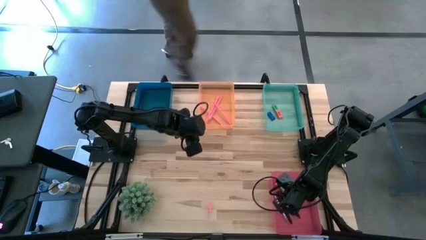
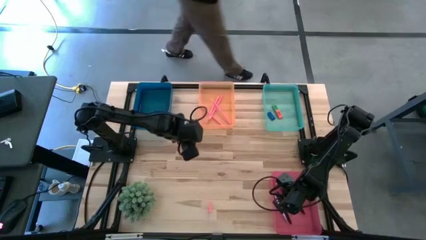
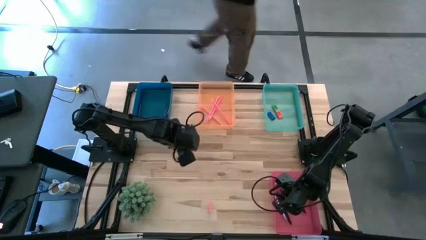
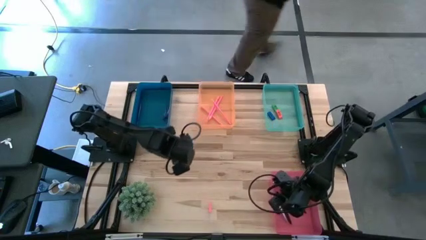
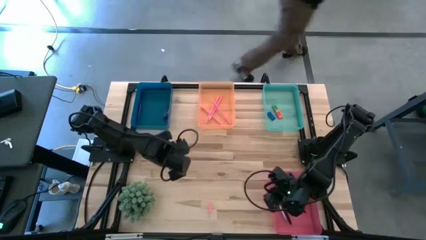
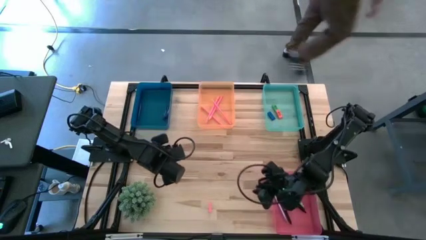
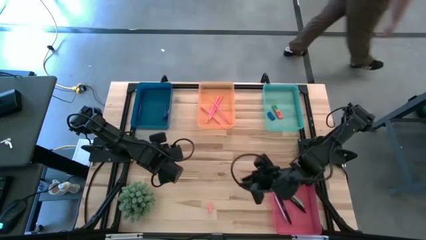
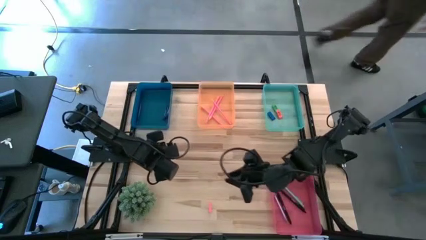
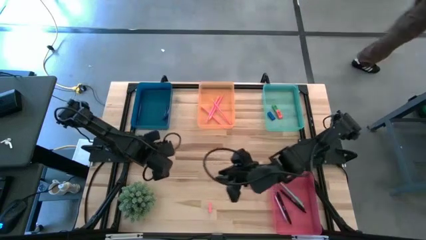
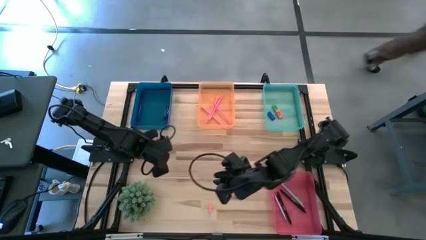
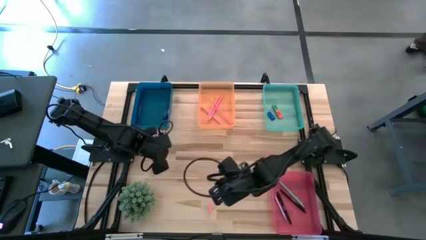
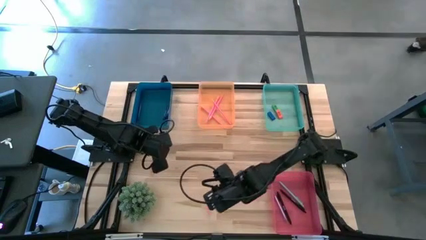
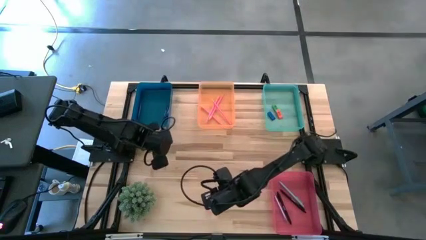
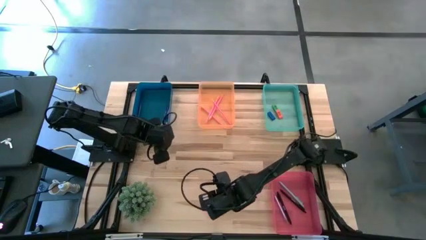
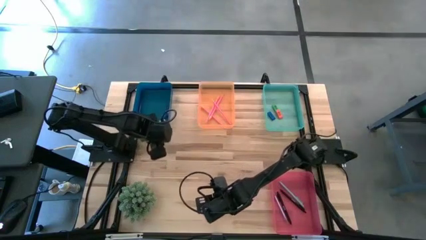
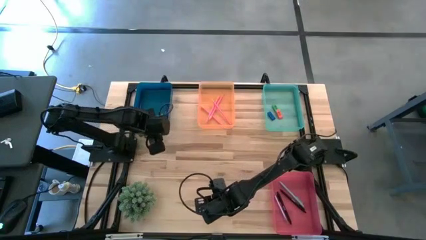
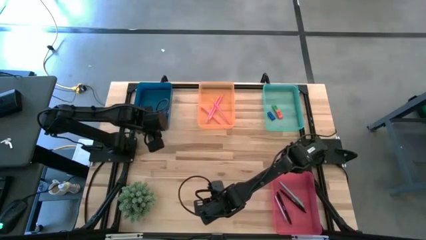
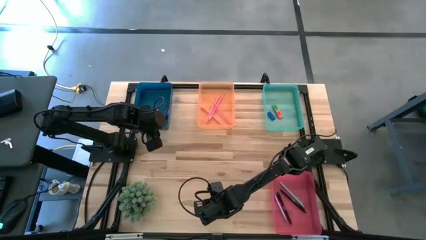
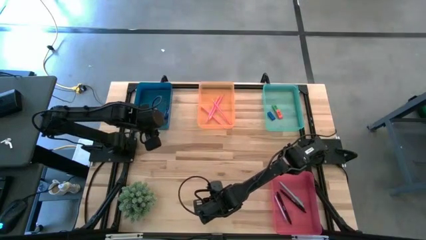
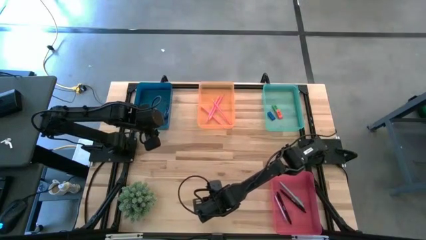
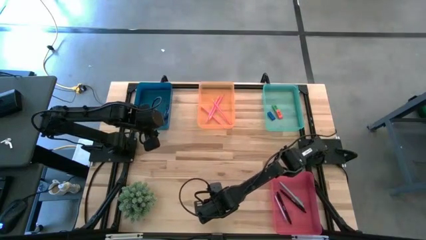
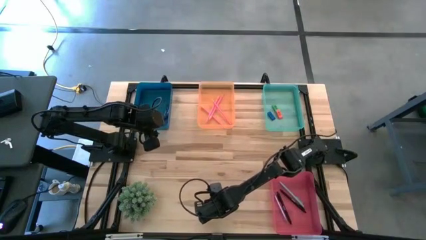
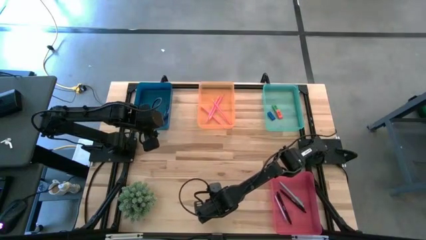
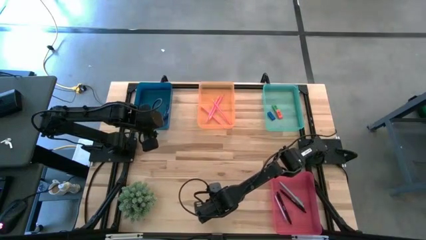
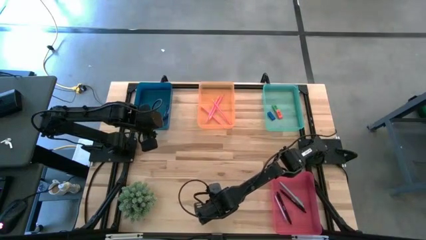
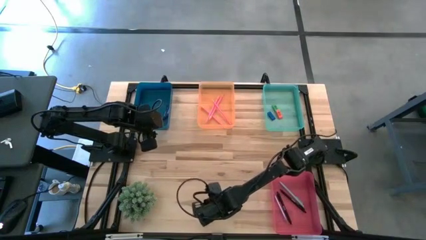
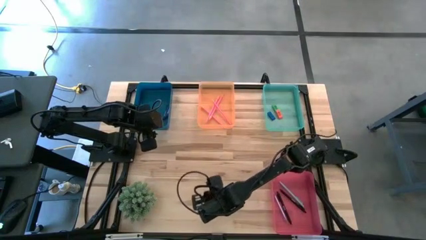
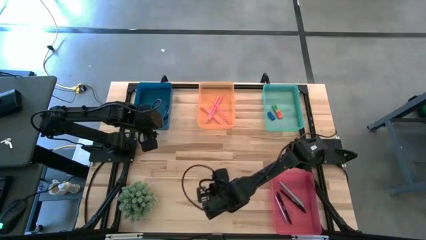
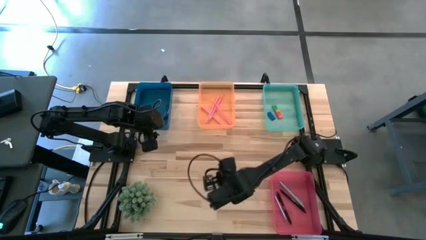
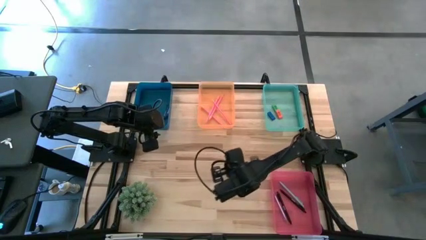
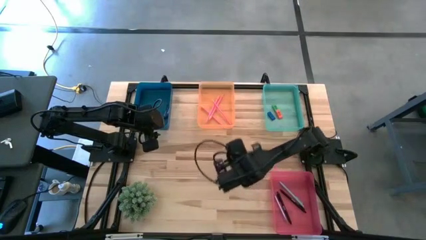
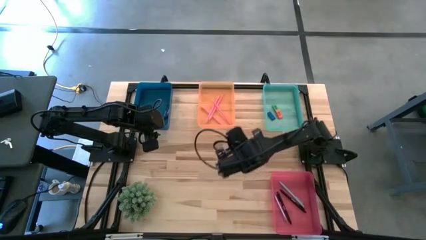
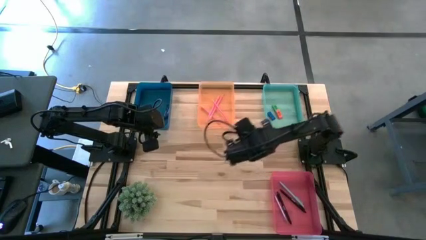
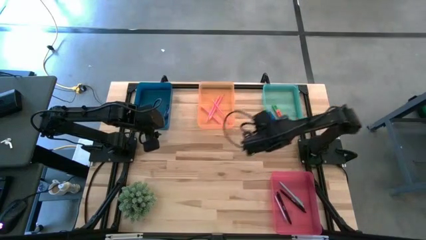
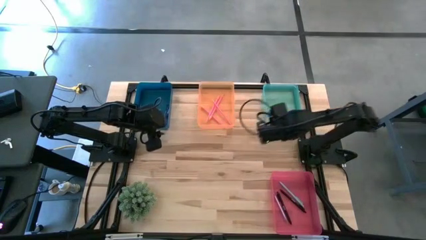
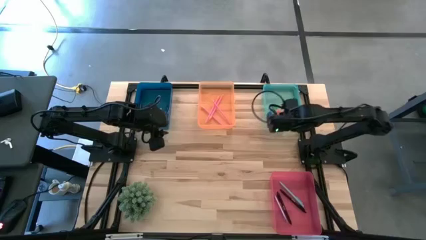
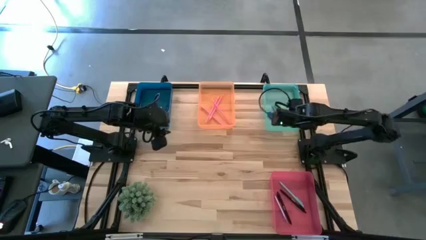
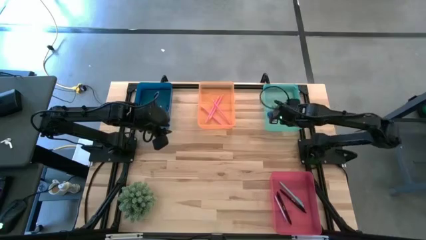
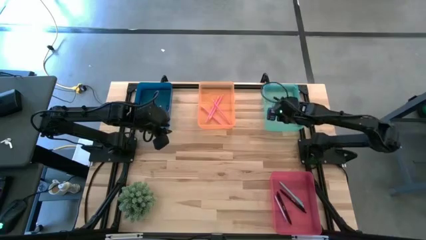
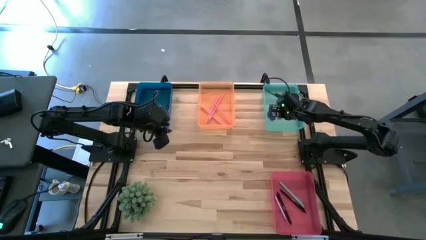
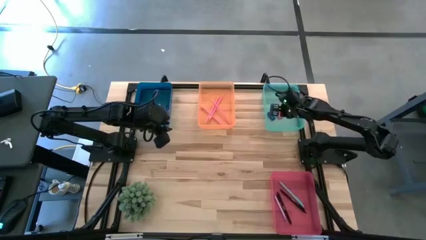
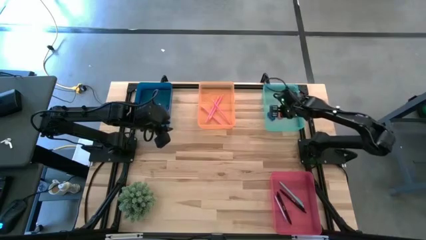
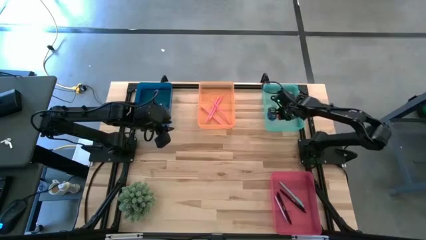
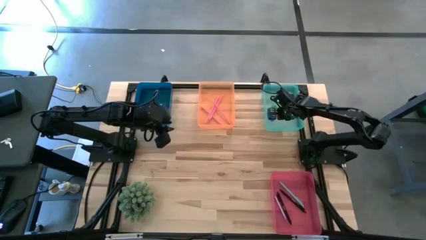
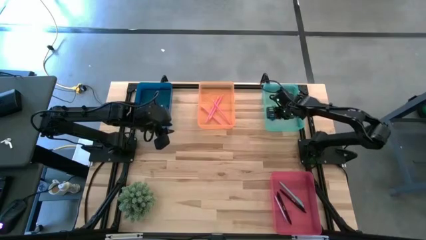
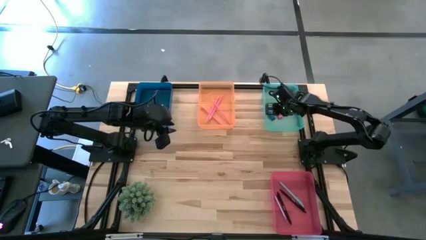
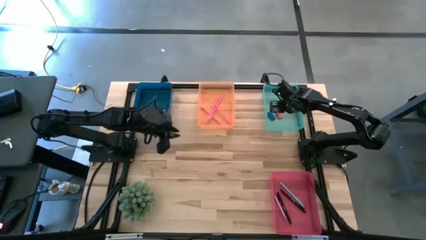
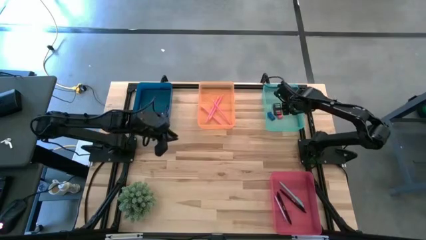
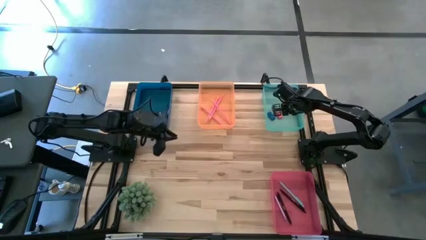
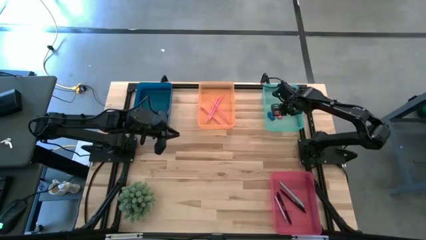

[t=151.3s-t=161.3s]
Task: Sort crayons/erasers/pens/pencils in bins
Put the pink eraser into the green bin

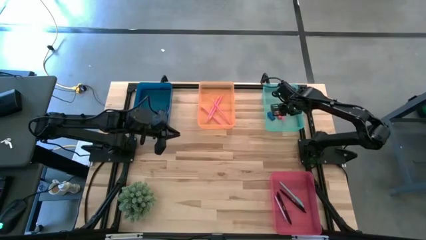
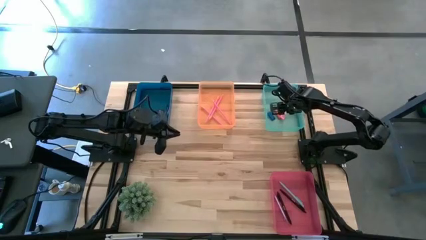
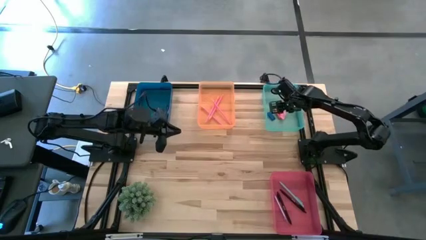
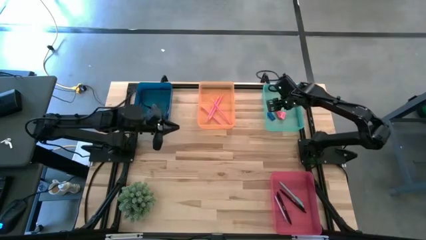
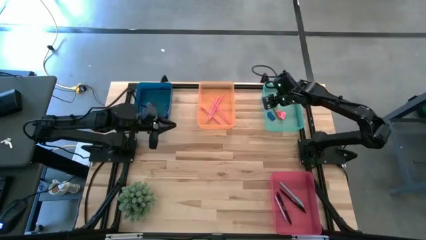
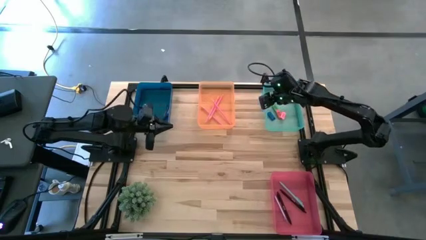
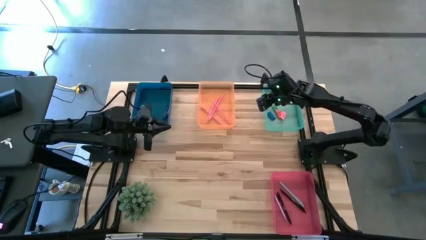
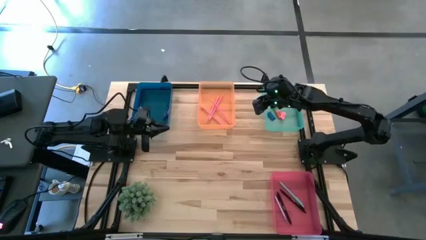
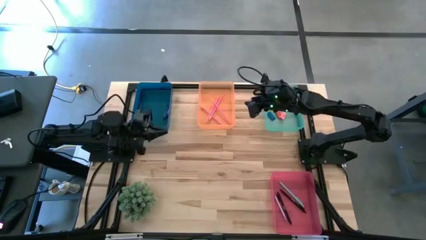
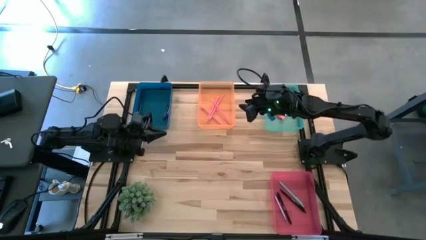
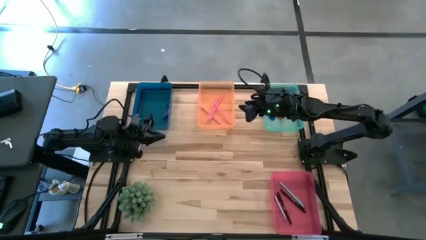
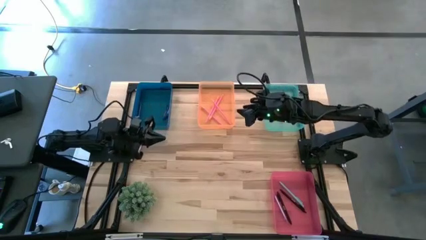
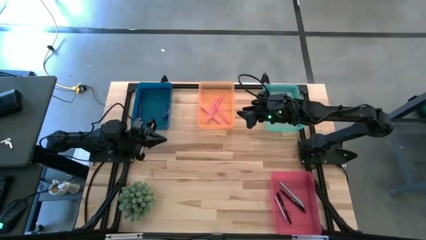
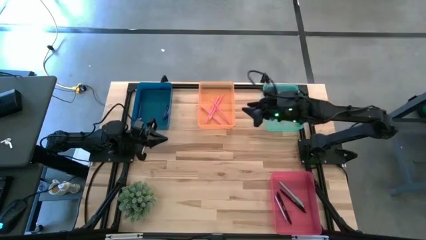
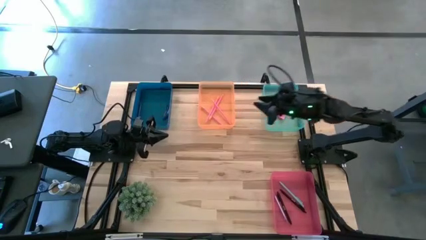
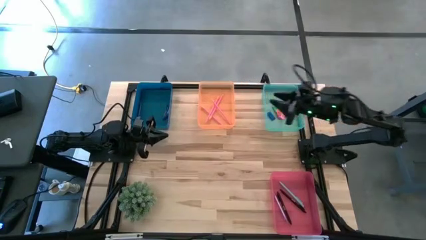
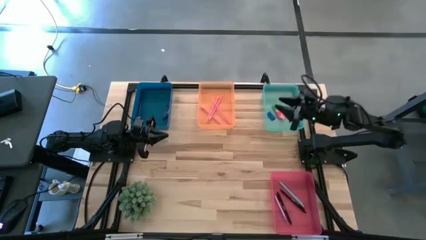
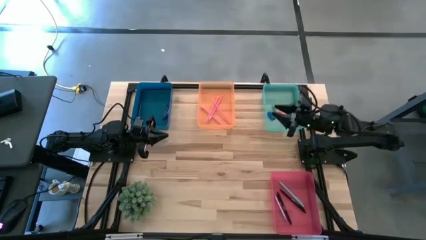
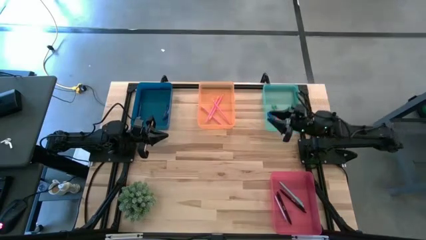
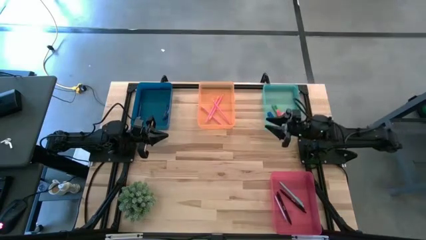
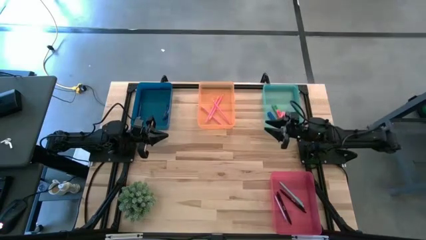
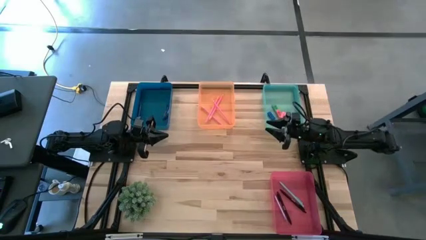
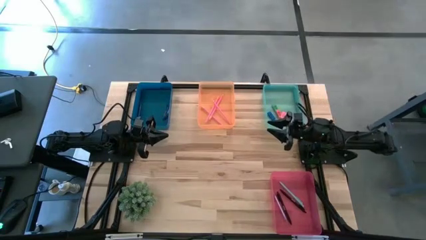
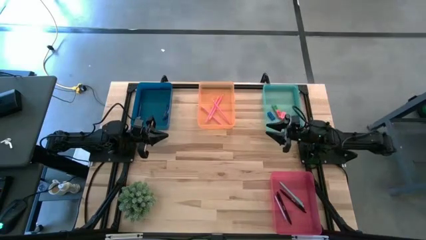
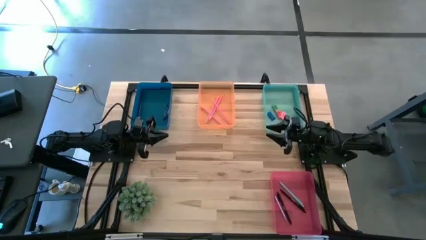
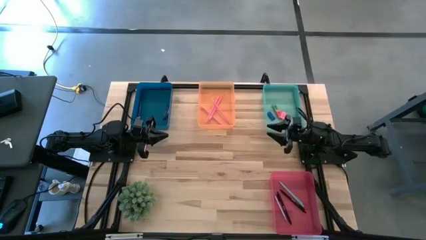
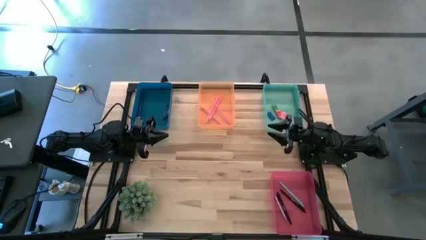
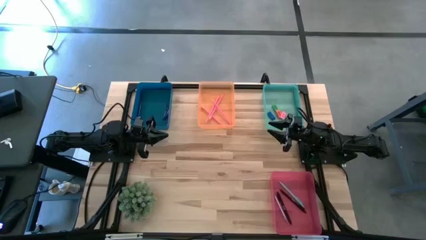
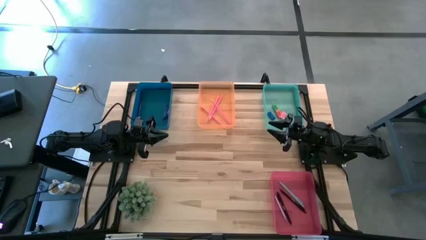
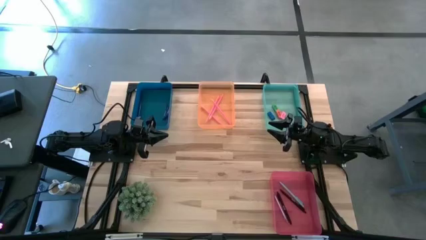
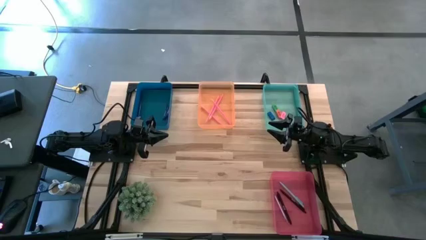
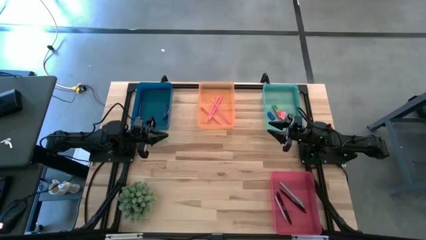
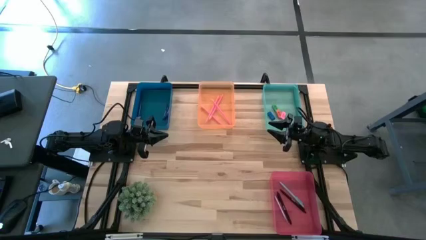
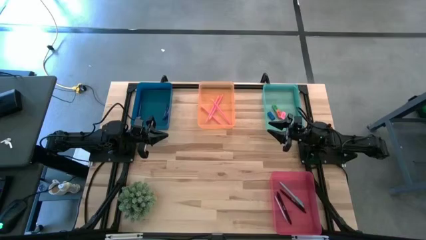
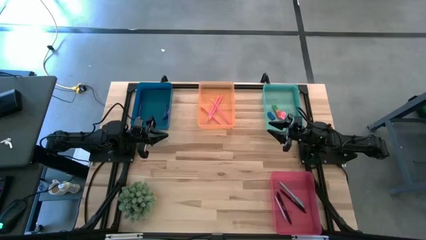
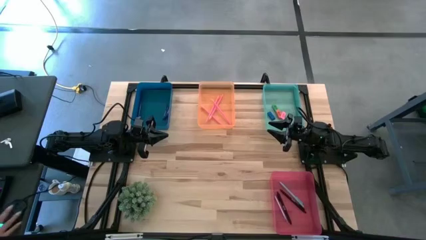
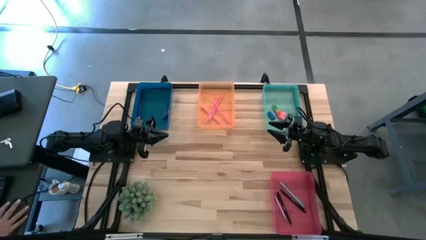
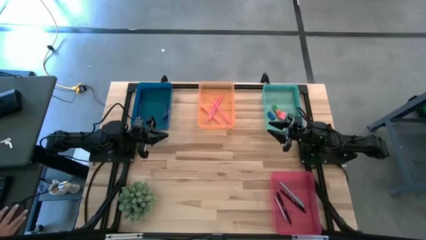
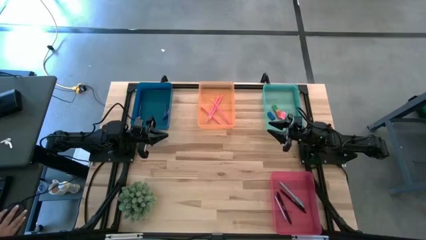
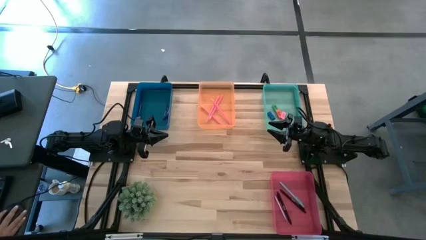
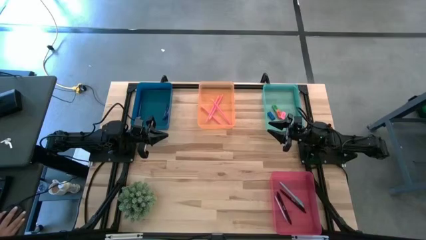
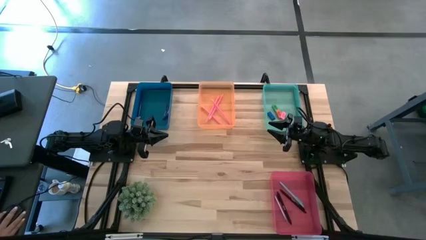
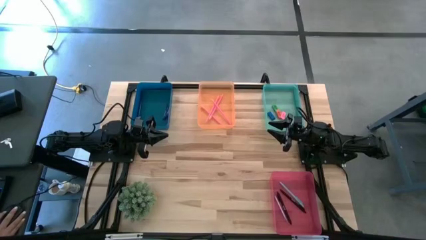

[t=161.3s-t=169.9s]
Return to Home Position
